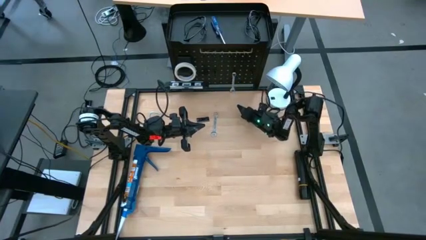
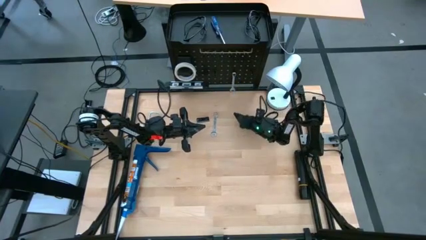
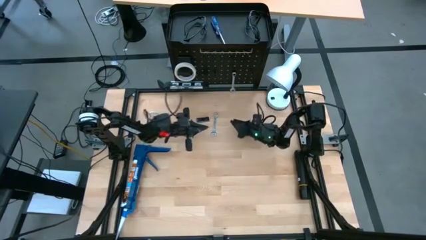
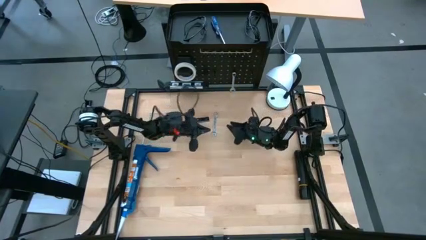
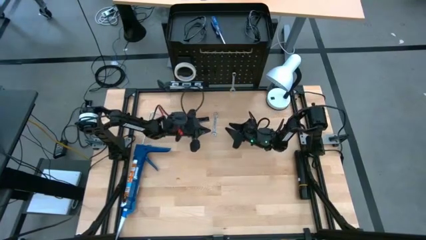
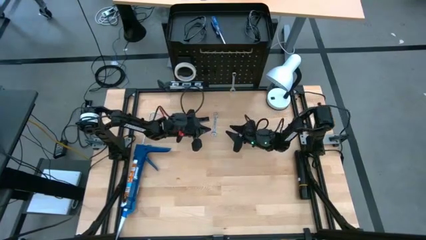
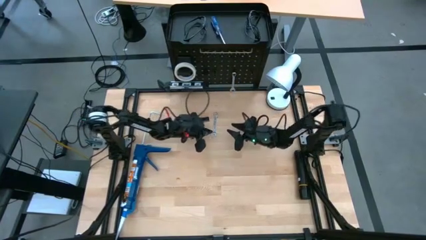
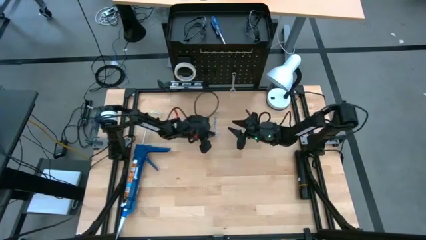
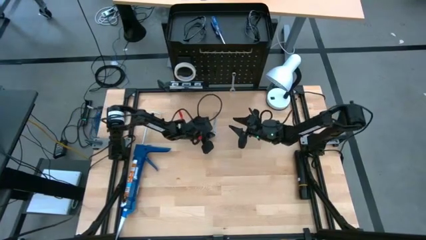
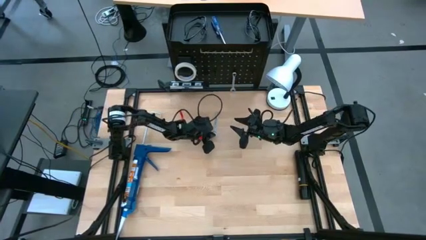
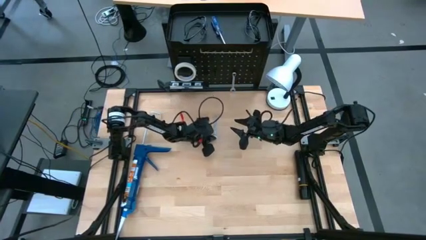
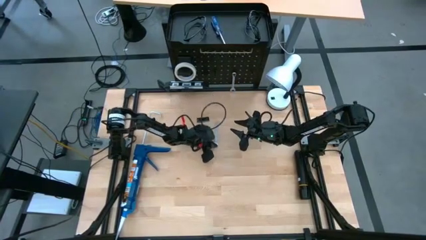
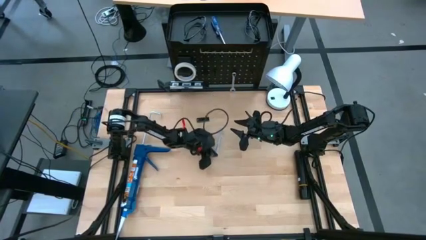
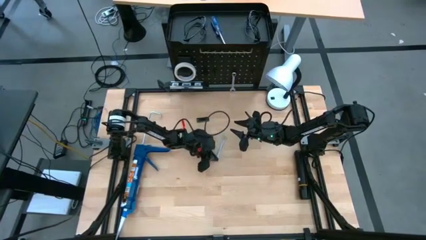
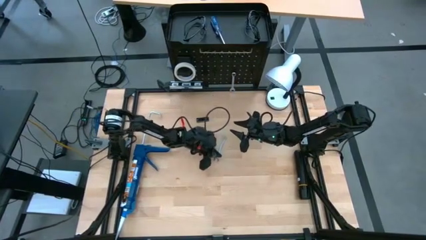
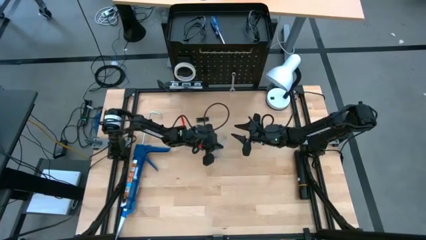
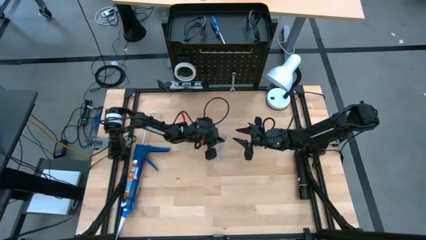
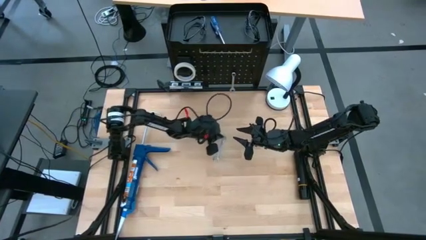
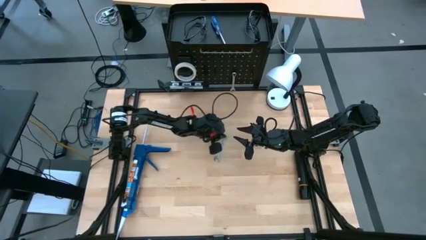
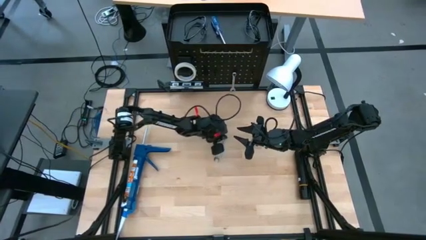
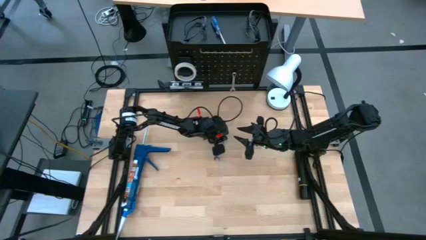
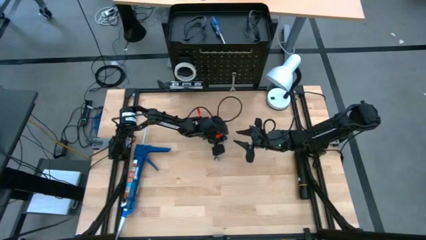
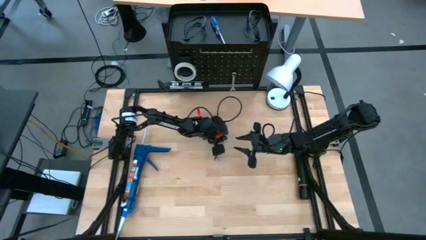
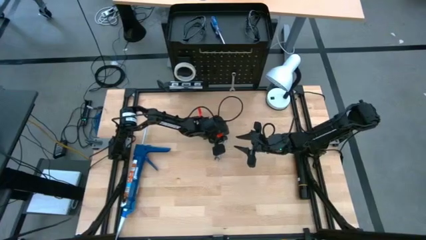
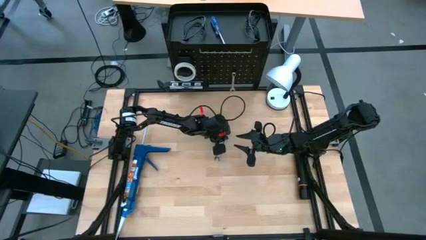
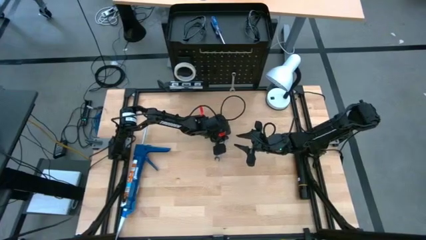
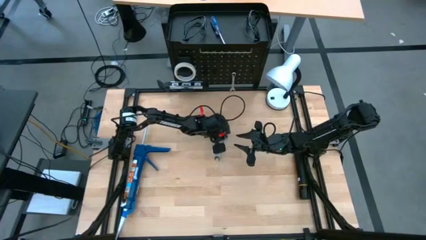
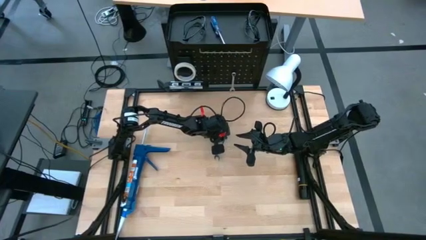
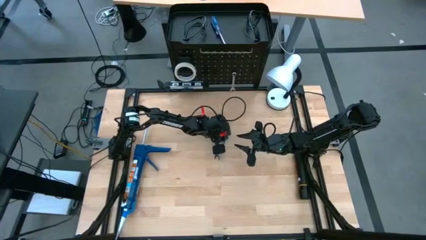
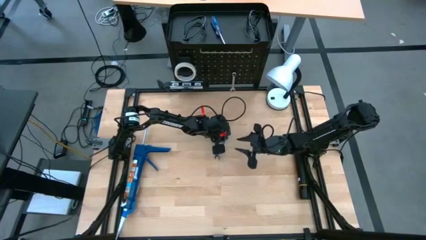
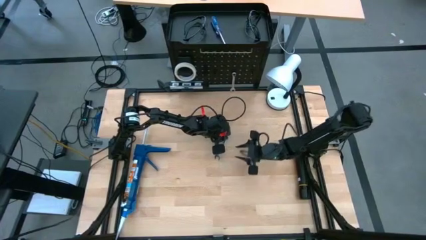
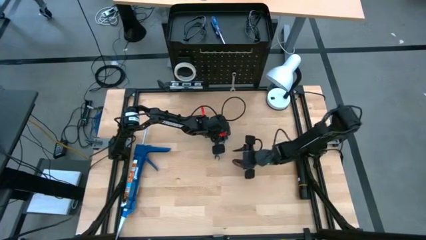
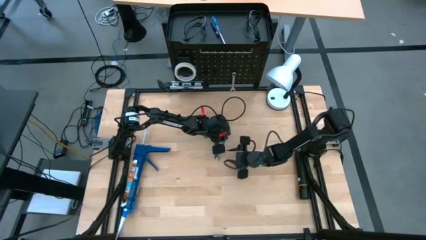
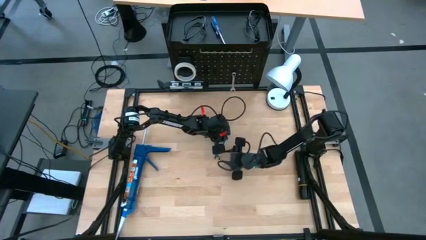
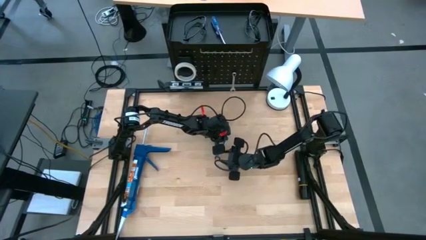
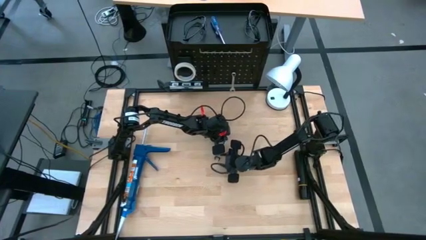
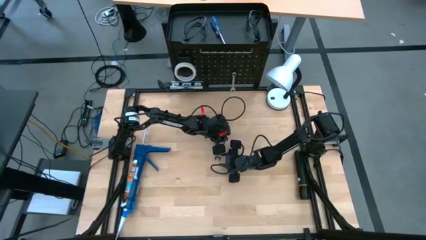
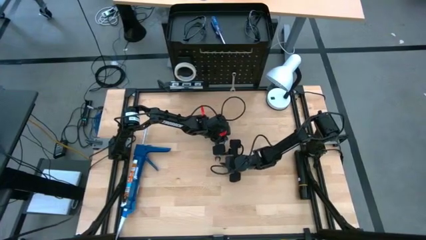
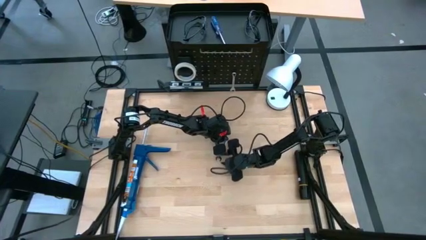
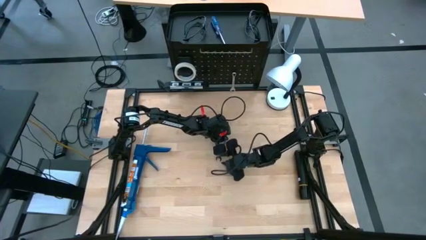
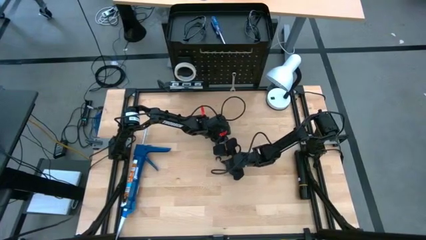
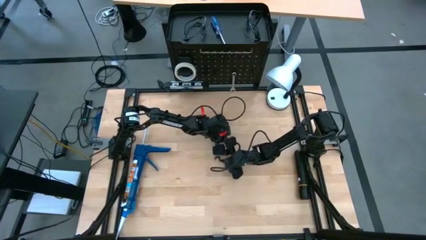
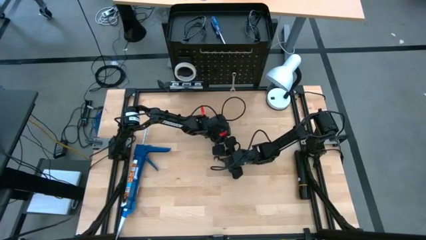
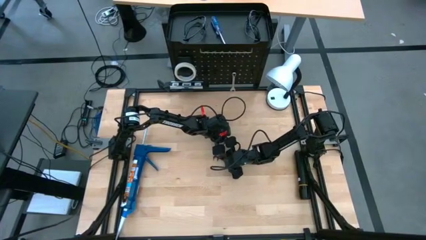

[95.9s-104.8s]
Task: Hang tools onto peg board
Hang the wrench on the pegboard

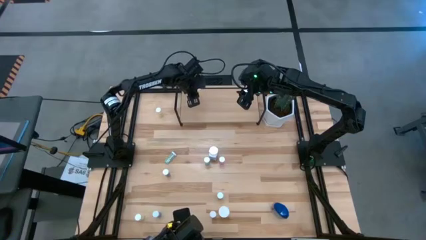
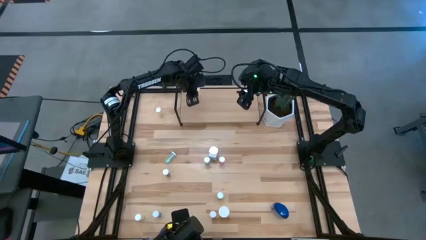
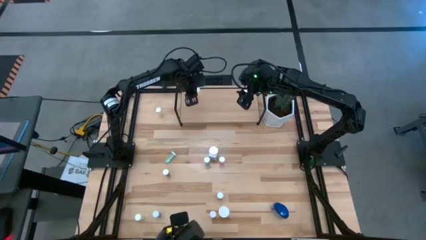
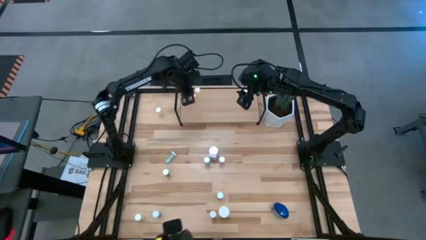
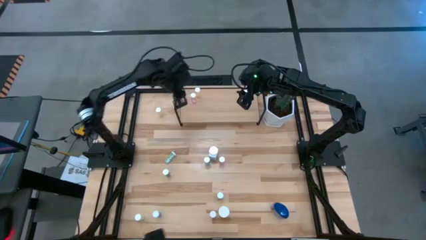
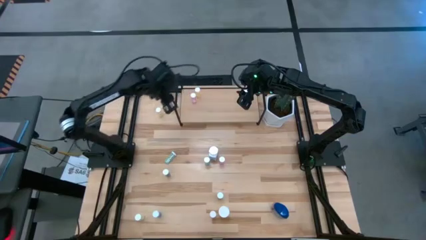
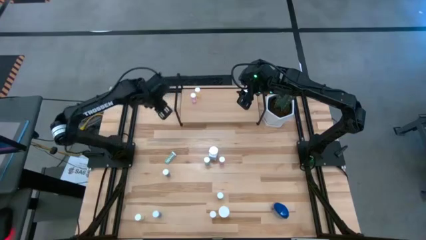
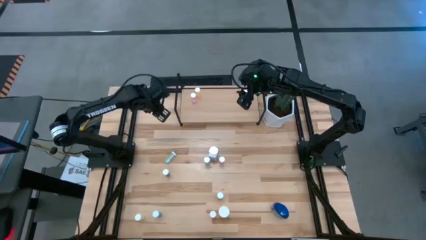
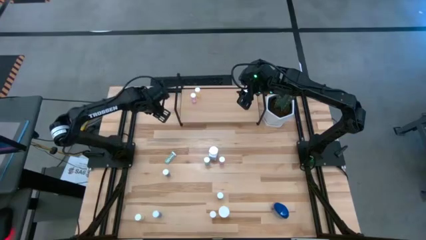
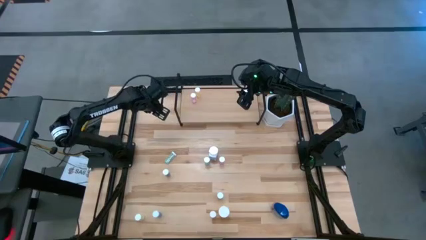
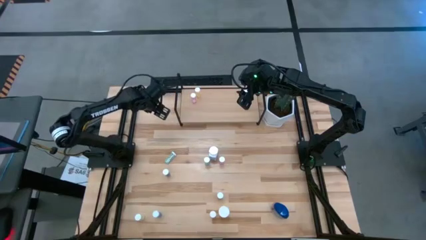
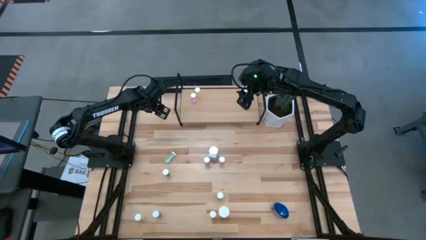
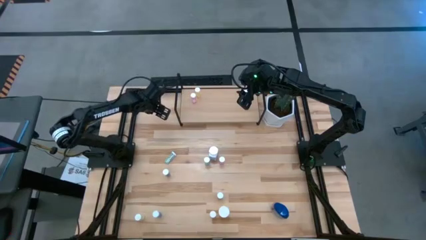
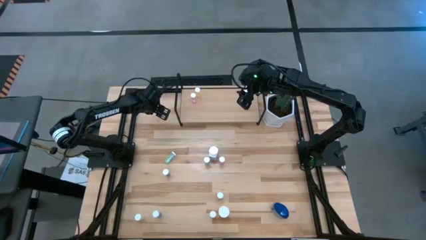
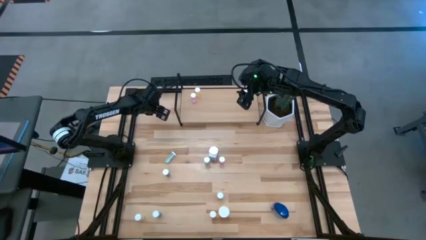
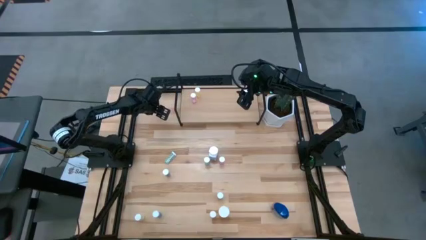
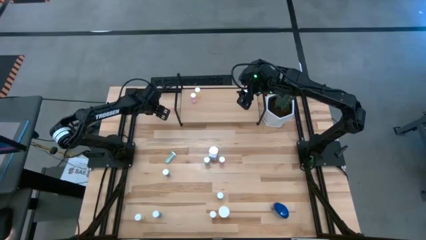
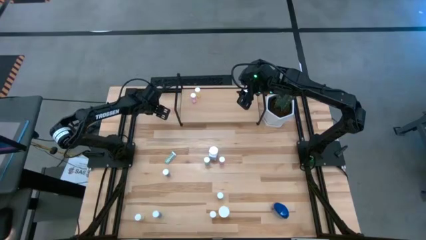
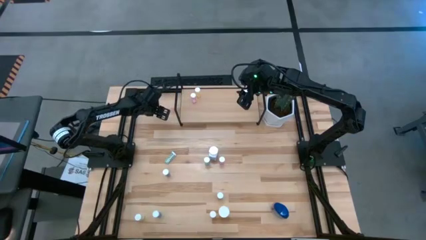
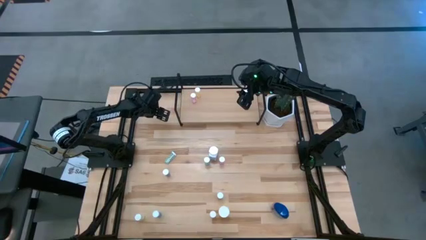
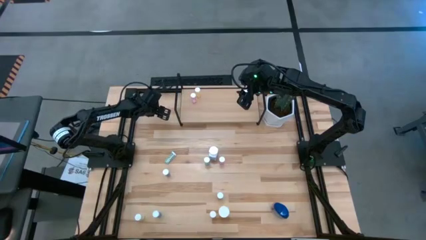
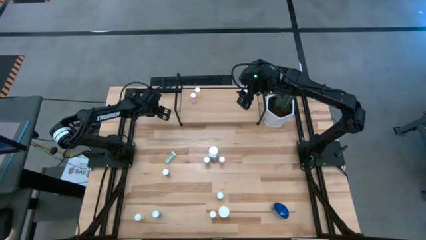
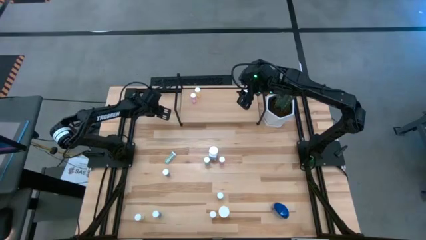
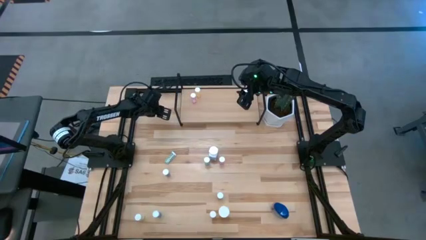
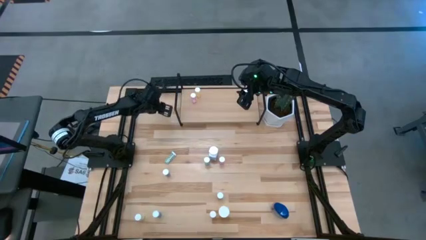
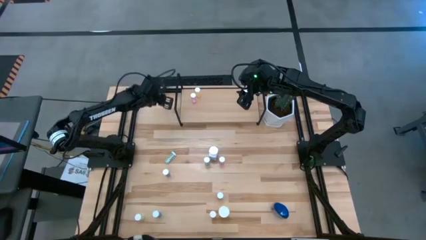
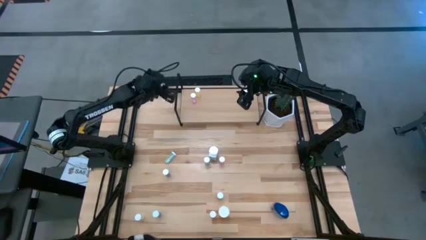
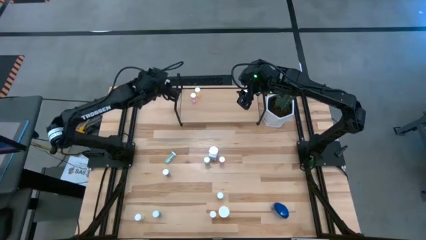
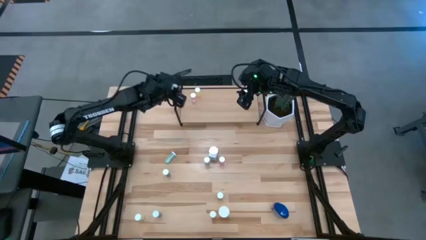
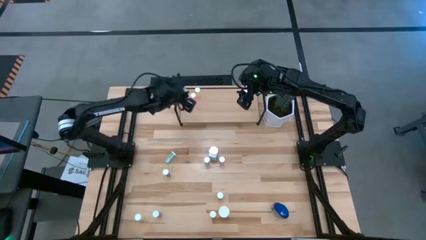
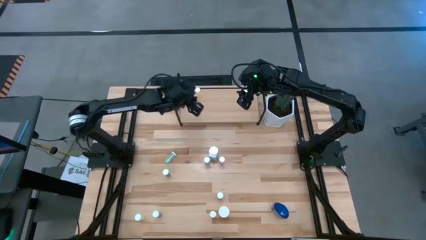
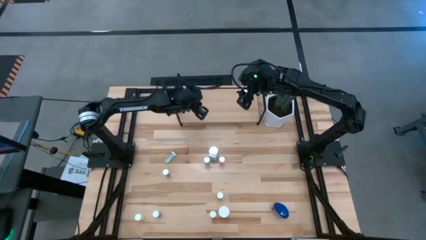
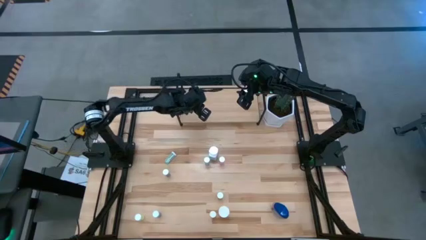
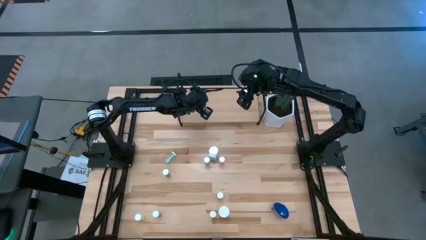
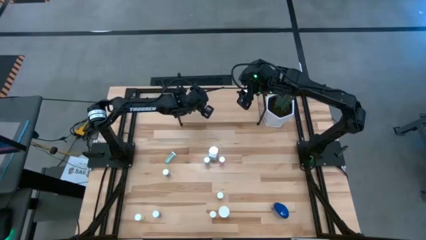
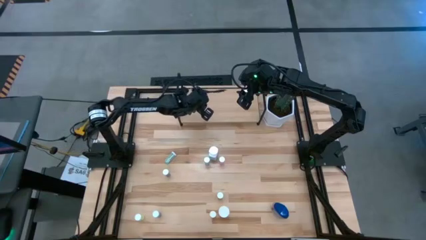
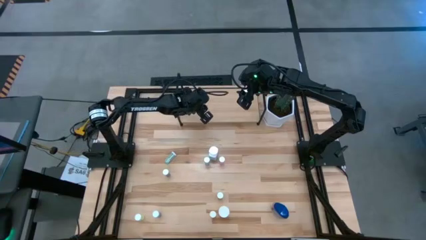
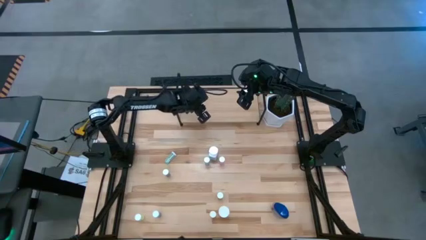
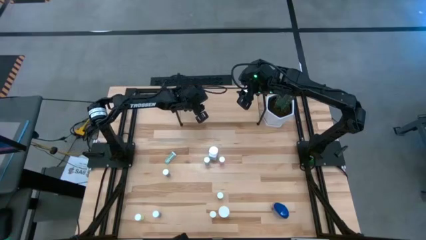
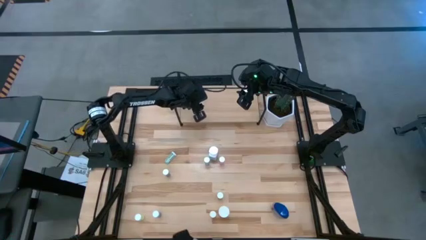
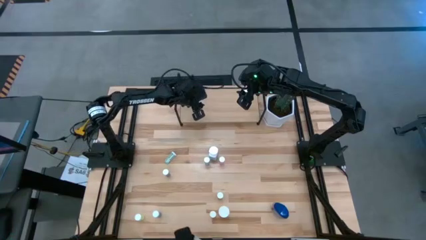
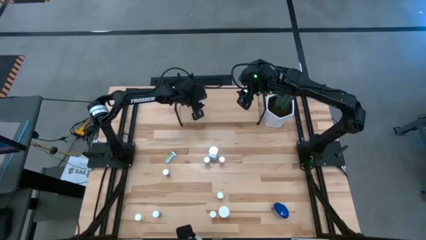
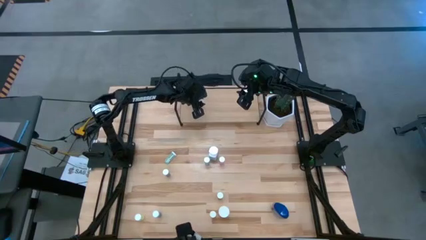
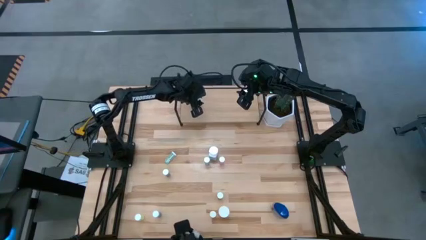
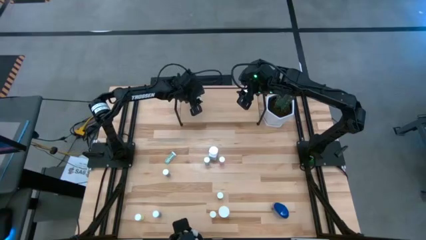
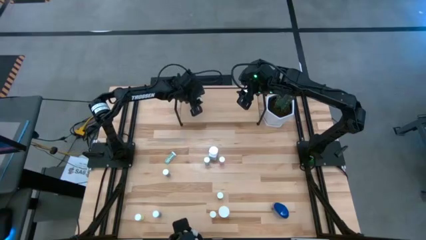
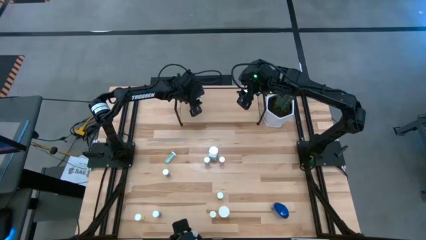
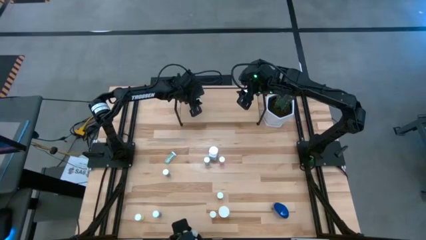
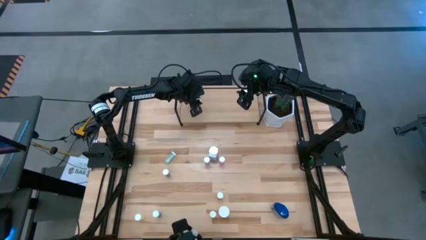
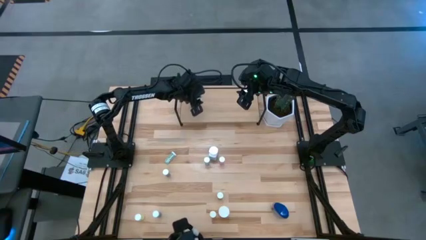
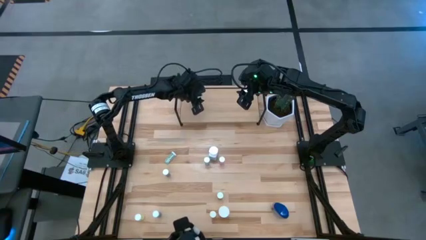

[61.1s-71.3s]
Task: Pick and place medicine bottles onto shelf by color
Put the yellow pill bottle on the shelf
